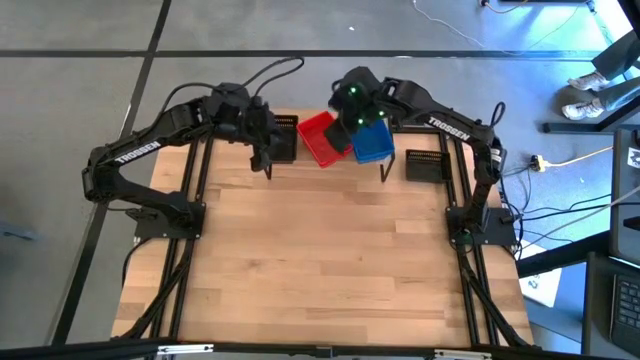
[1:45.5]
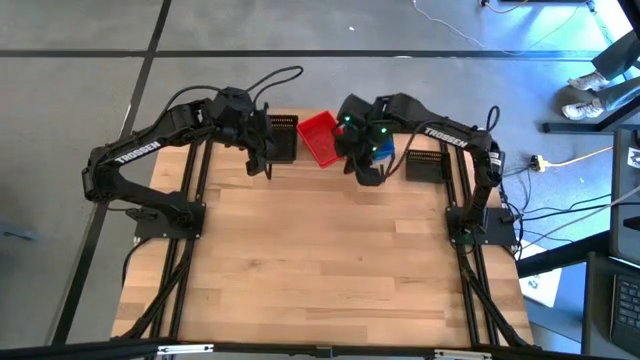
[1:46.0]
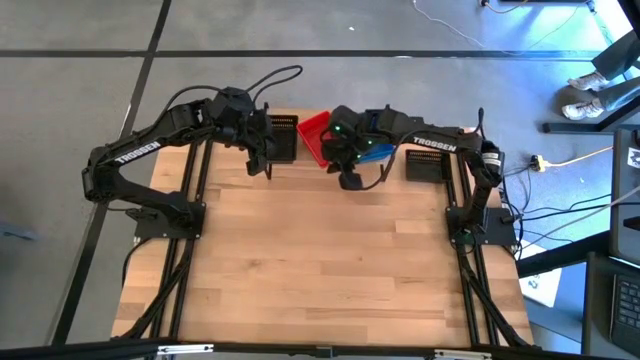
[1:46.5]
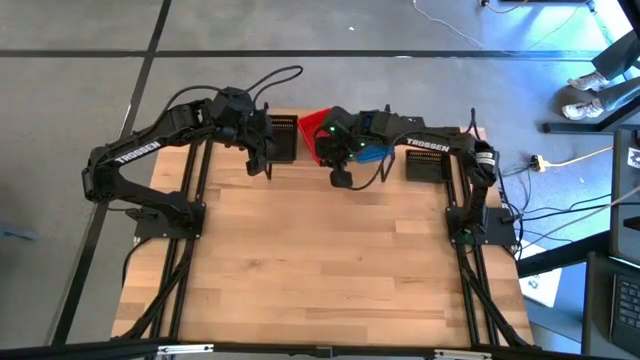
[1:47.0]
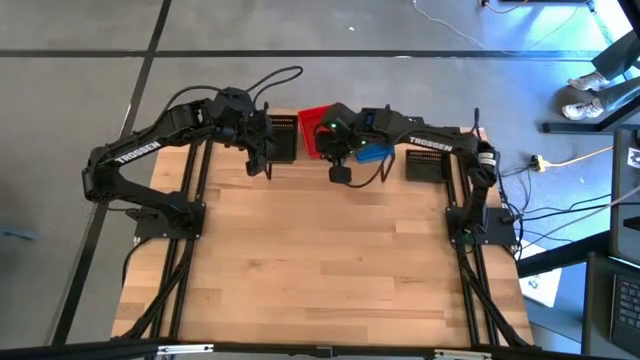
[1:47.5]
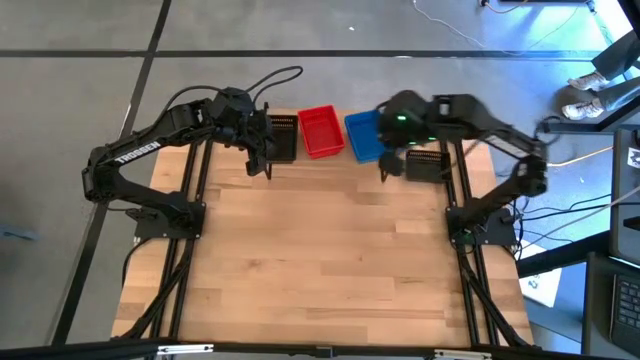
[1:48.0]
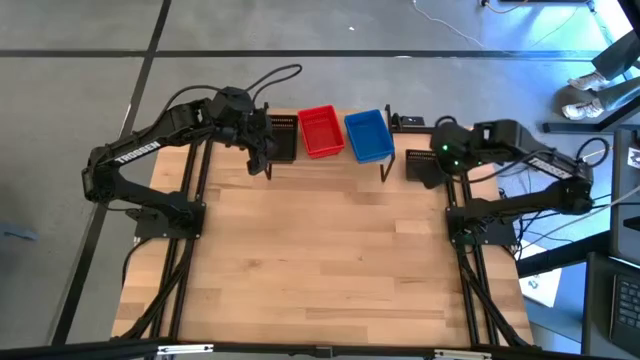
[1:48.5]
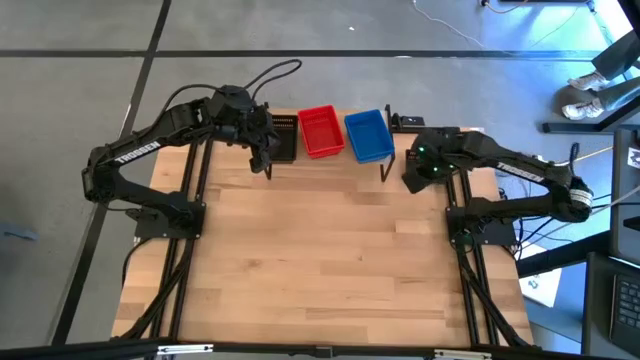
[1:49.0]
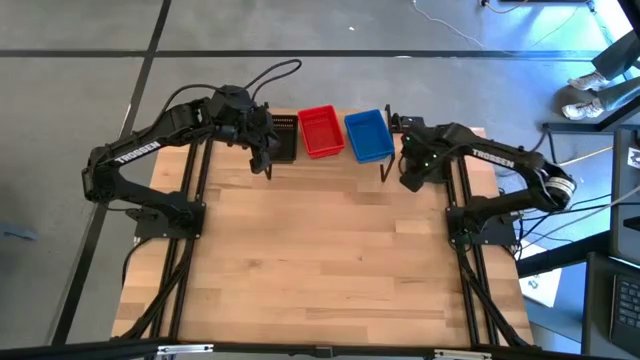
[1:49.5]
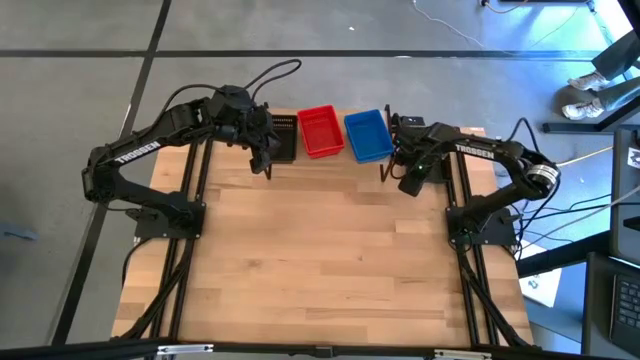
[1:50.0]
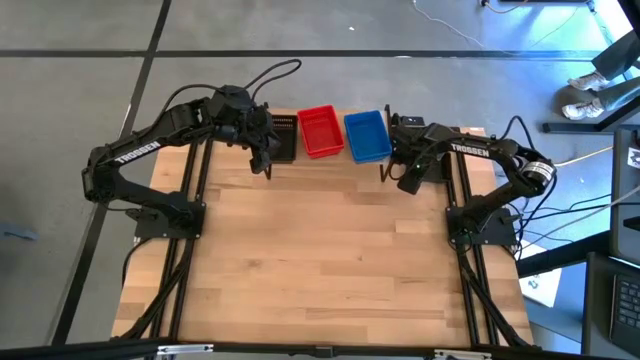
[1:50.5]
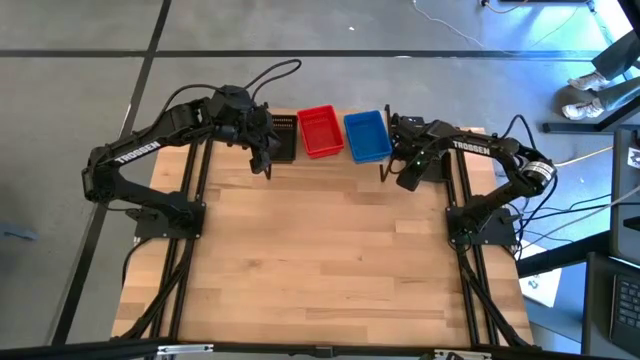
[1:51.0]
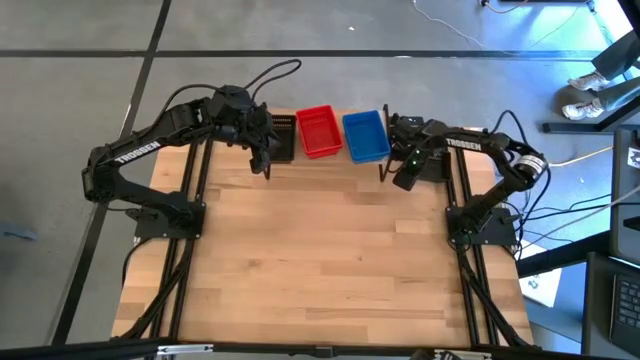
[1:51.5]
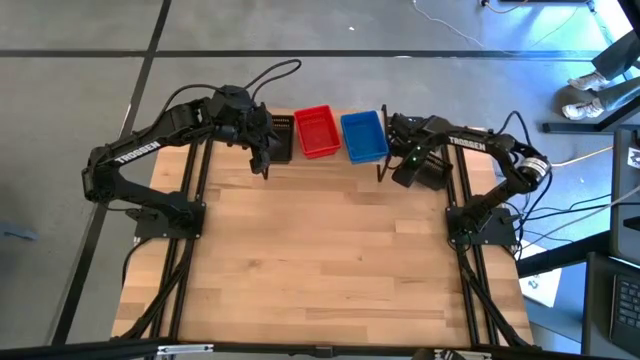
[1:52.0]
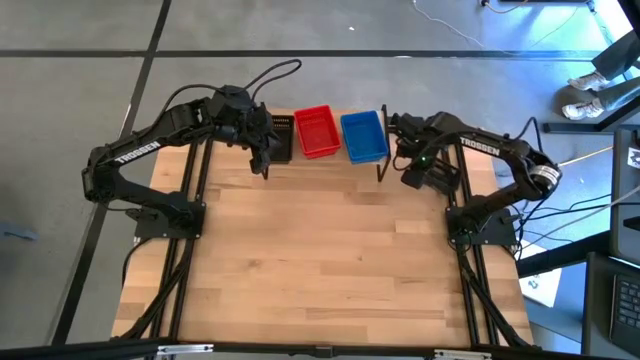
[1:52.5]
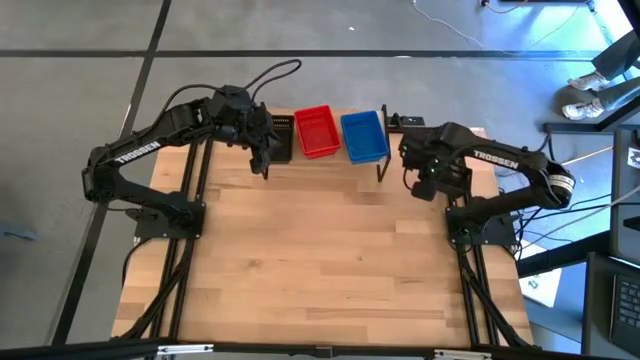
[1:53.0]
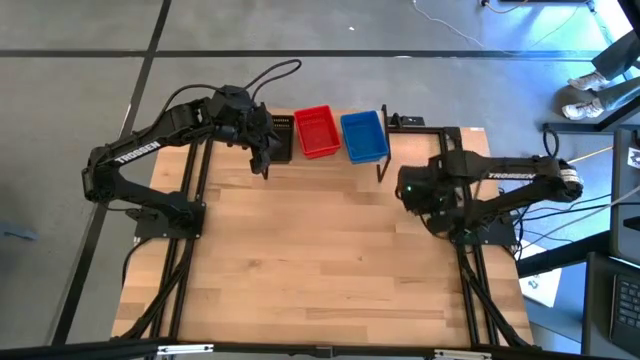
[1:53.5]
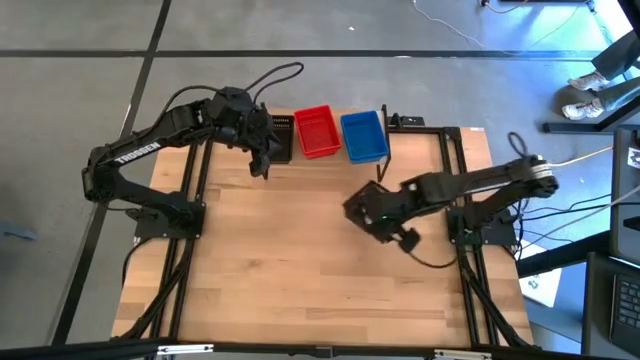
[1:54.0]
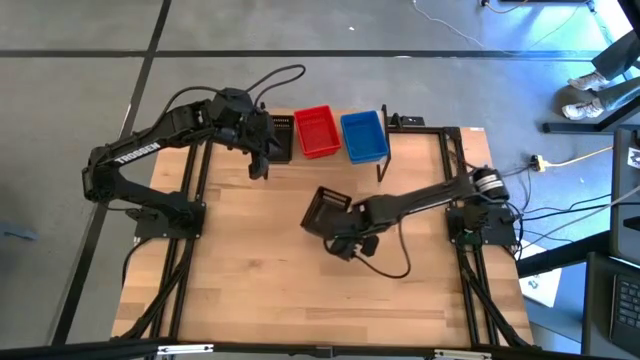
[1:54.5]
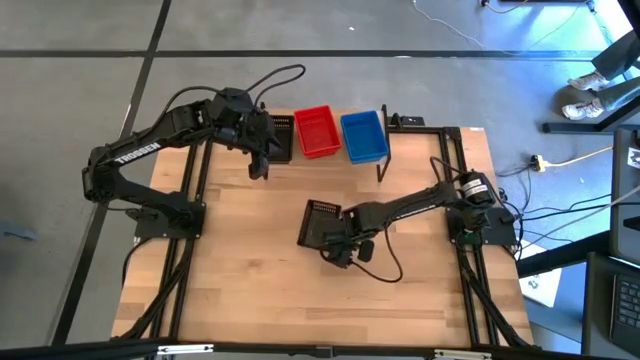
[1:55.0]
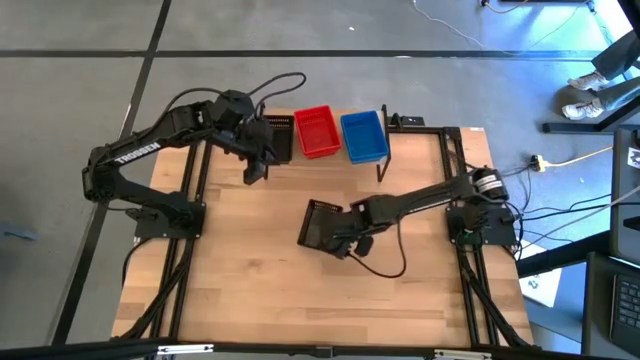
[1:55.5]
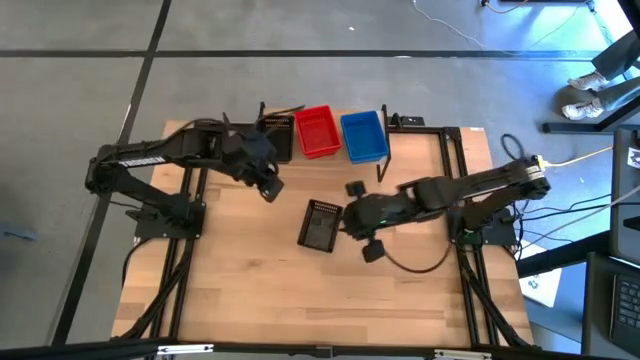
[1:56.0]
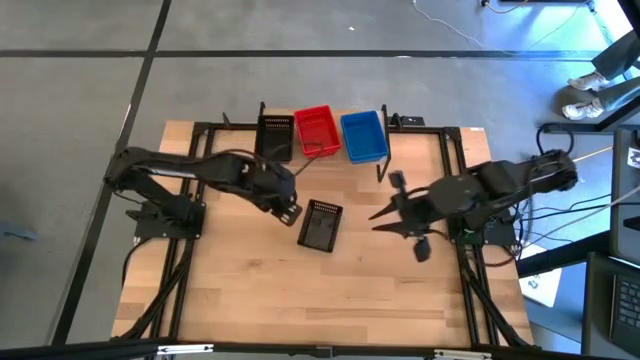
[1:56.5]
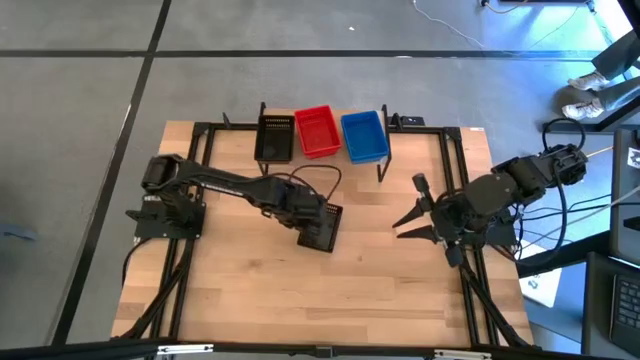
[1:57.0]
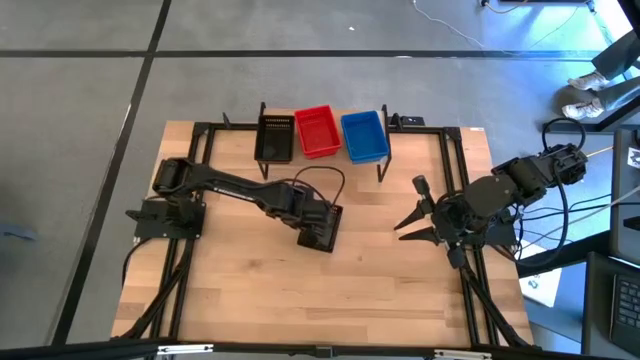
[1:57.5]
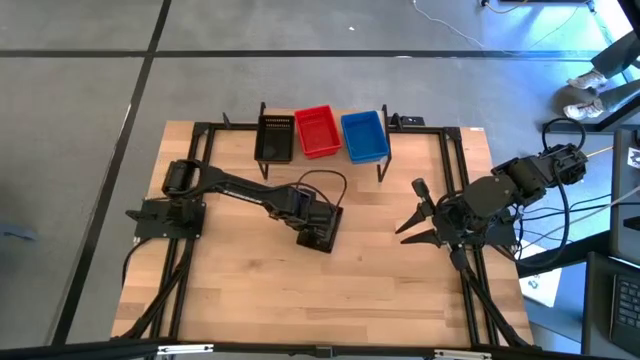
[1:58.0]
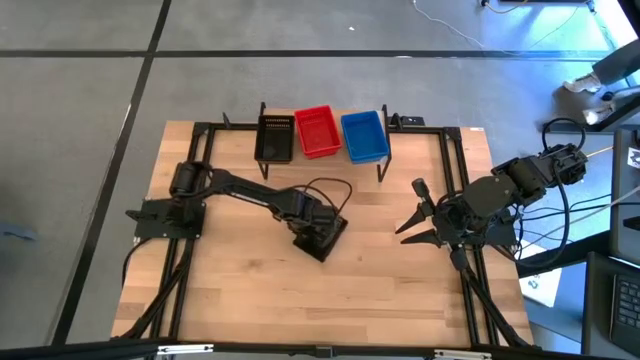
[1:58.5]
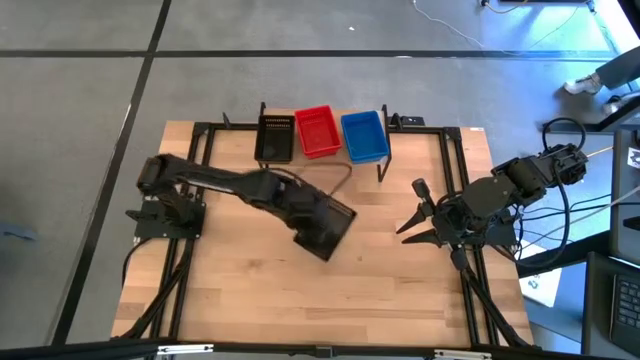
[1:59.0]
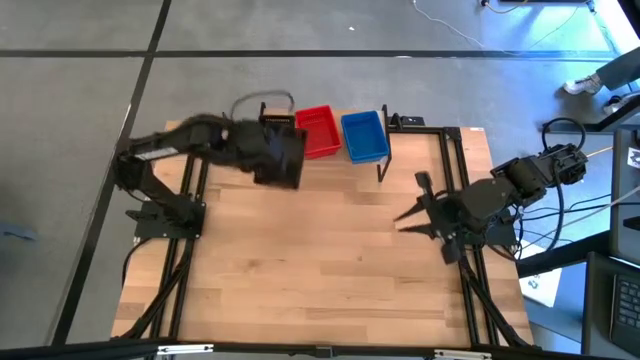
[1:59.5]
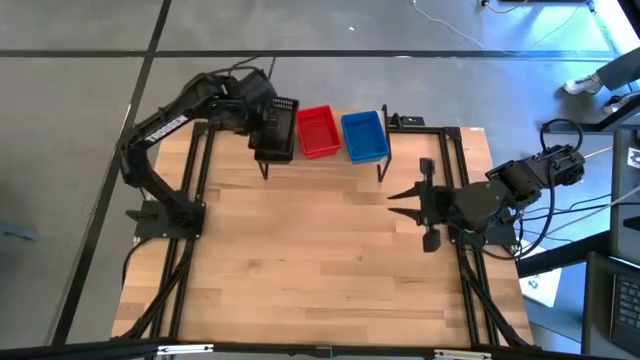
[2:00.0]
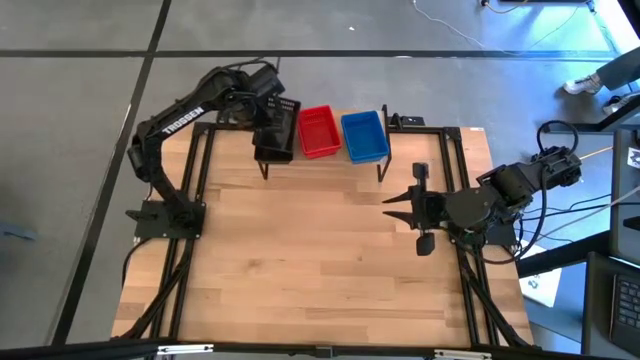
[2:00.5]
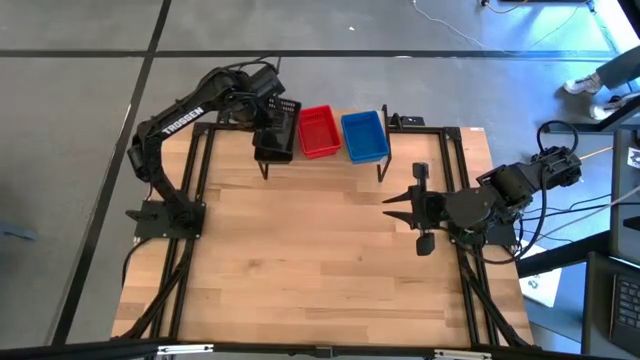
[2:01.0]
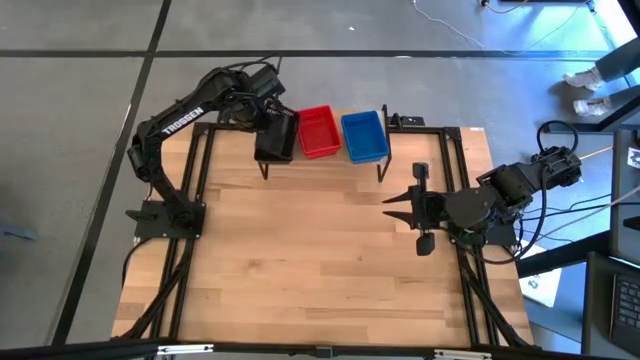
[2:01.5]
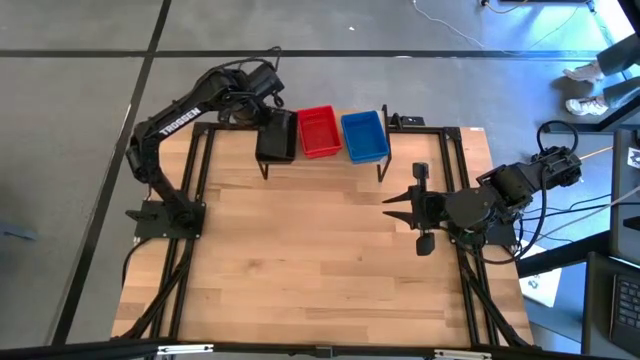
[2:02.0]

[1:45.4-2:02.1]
Task: Stack baskets on shelf by color
Stack the black bin on the black bin on the shelf

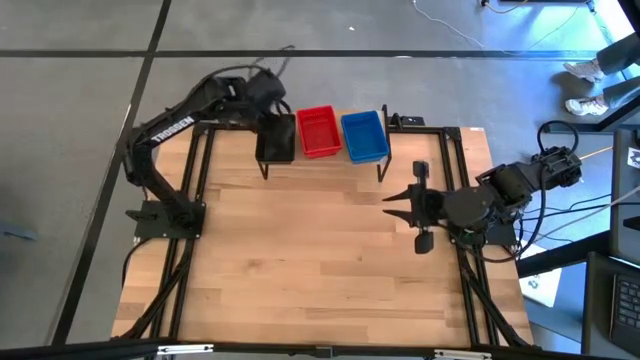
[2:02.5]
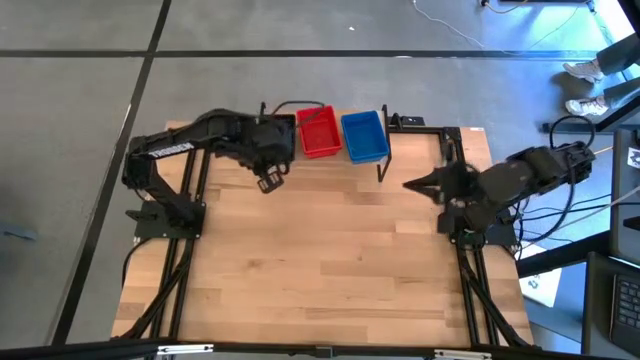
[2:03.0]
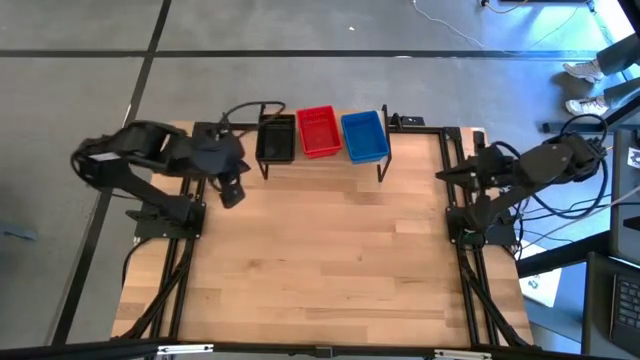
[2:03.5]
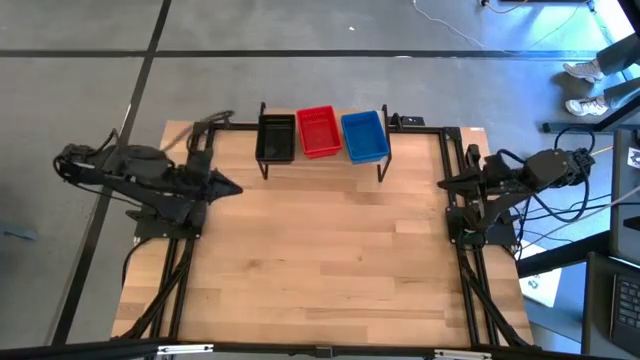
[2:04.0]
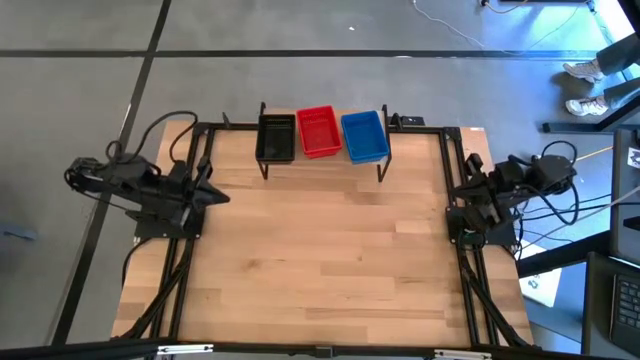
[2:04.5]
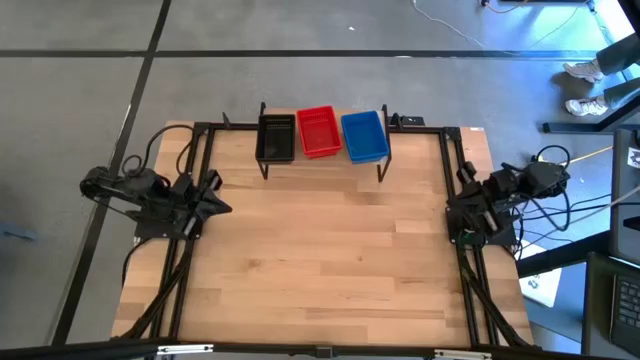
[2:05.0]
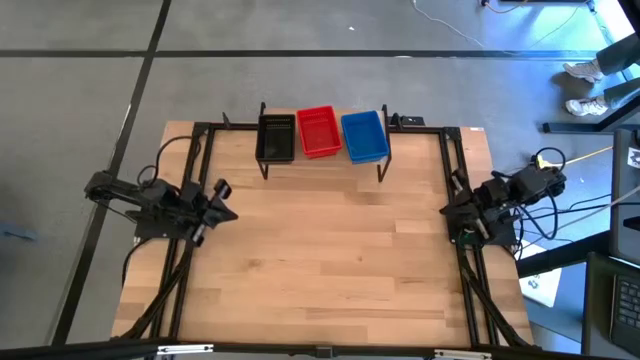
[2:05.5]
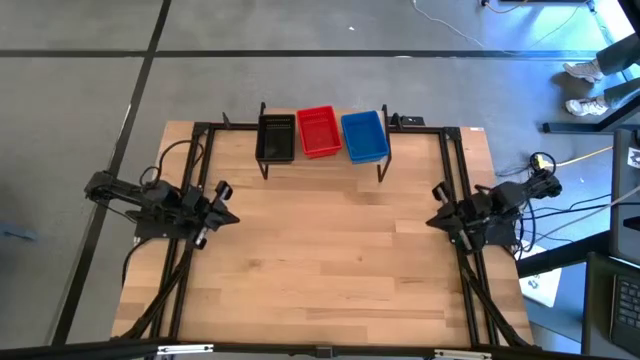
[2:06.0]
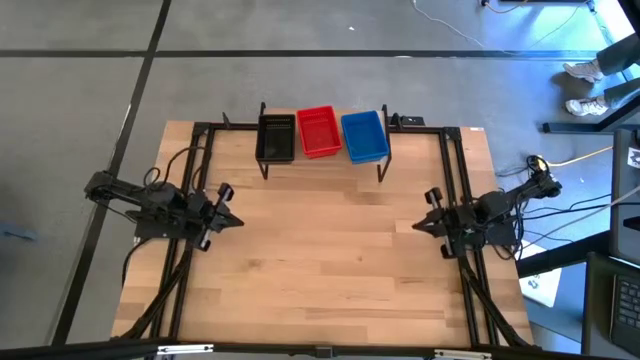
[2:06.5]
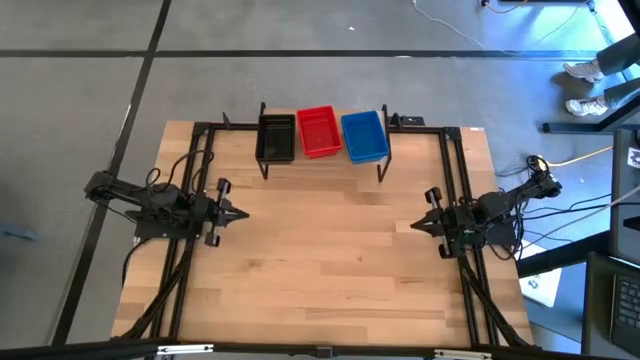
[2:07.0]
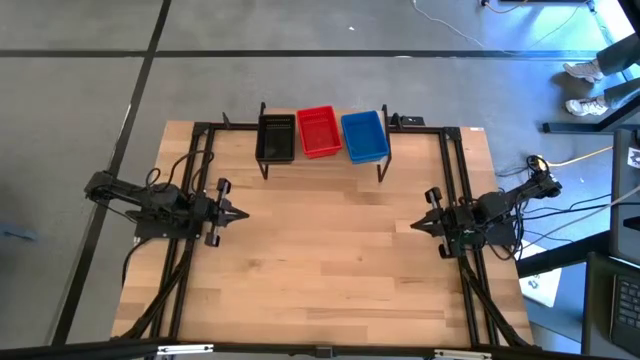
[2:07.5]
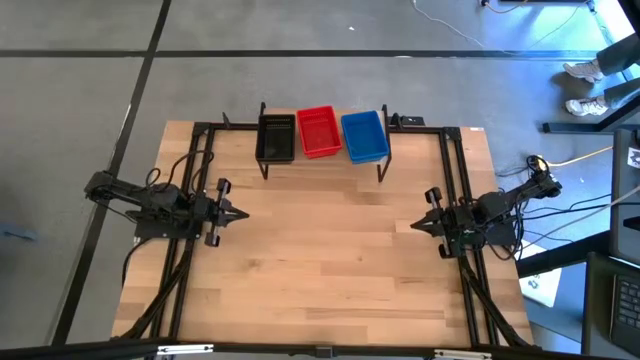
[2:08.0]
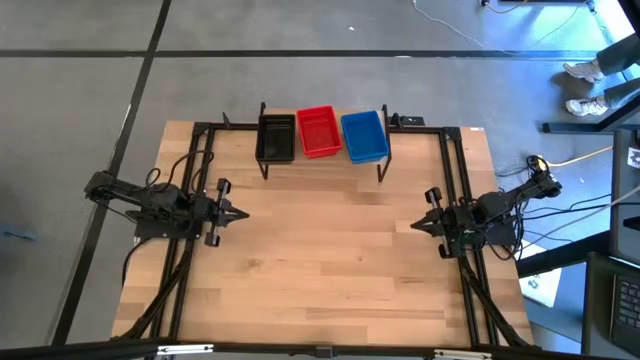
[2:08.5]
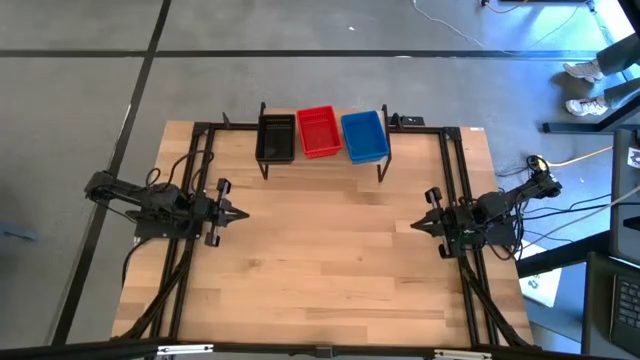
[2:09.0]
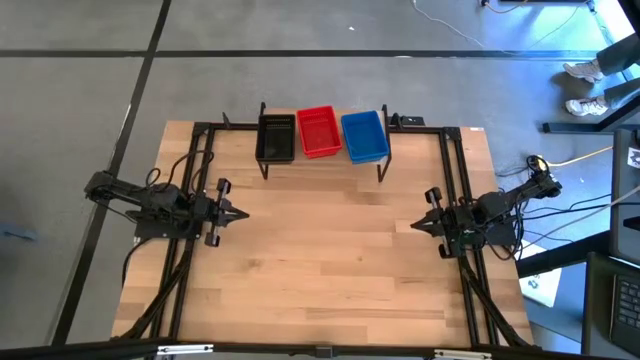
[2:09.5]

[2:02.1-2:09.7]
Return to Home Position
